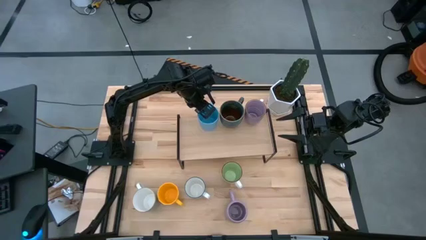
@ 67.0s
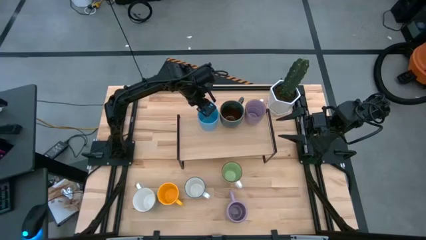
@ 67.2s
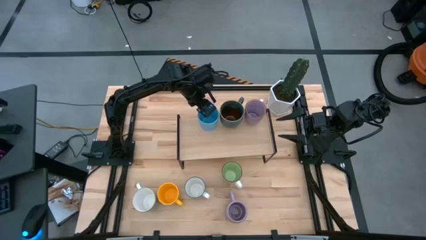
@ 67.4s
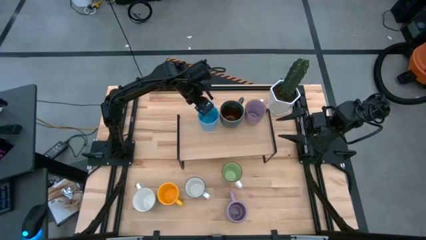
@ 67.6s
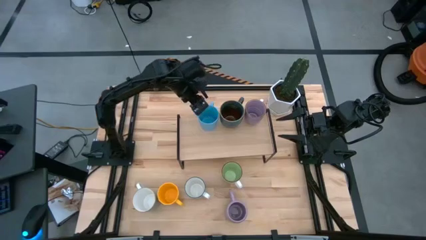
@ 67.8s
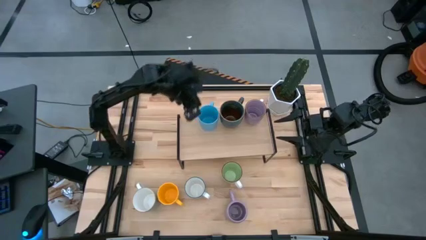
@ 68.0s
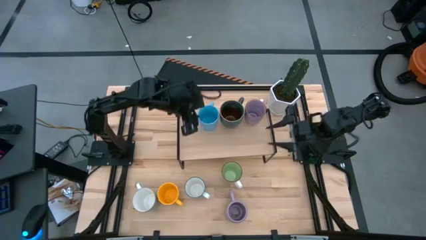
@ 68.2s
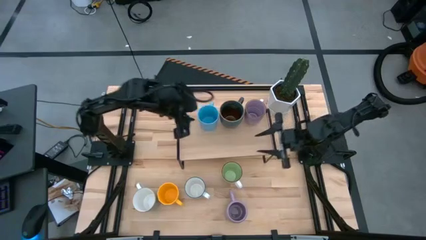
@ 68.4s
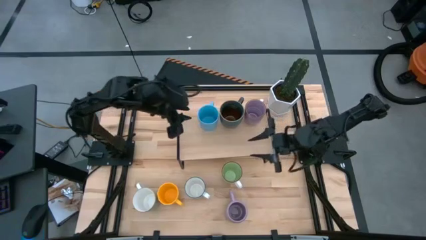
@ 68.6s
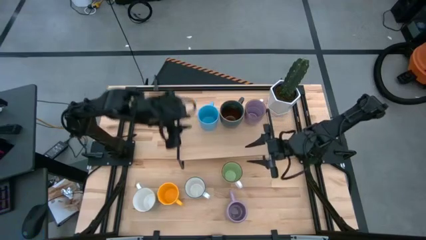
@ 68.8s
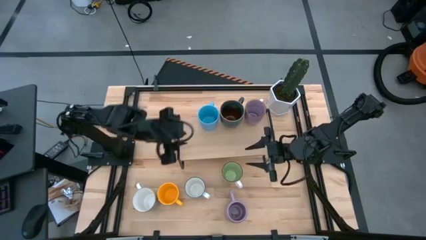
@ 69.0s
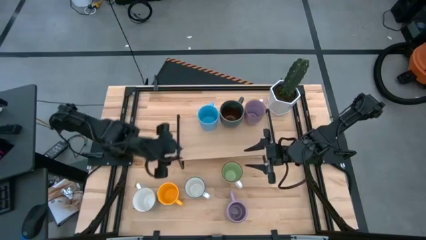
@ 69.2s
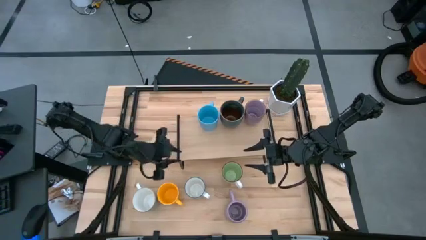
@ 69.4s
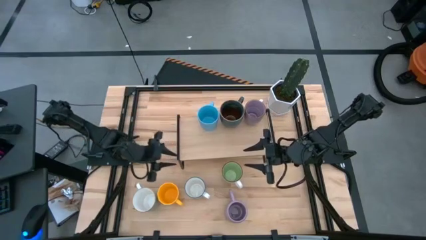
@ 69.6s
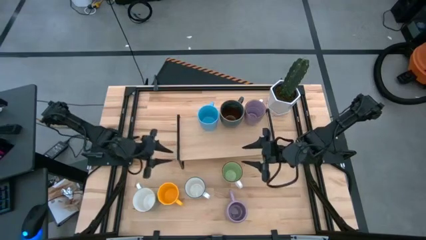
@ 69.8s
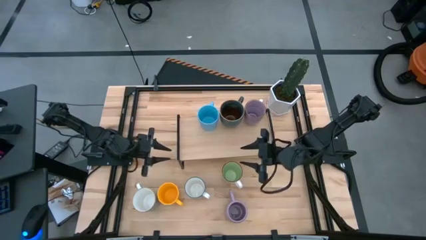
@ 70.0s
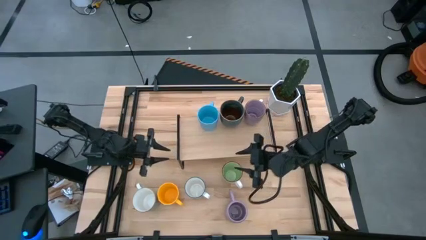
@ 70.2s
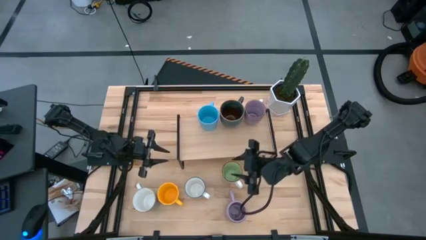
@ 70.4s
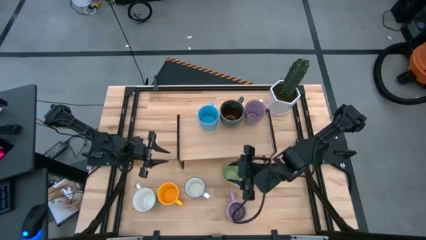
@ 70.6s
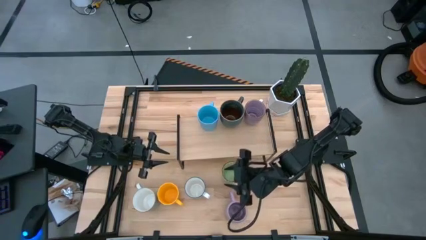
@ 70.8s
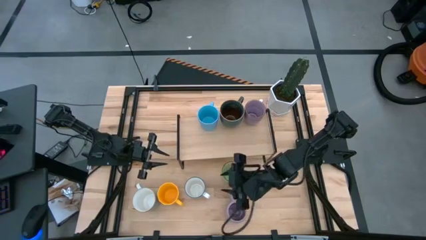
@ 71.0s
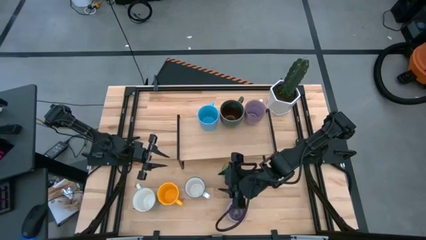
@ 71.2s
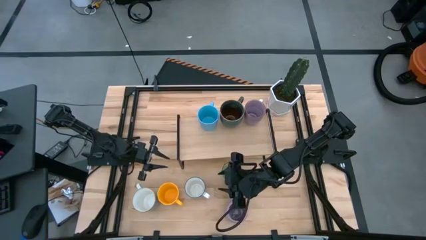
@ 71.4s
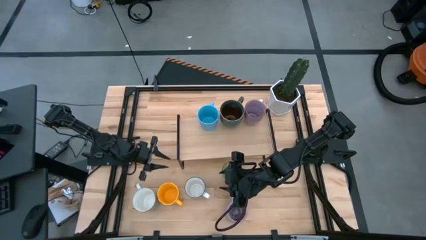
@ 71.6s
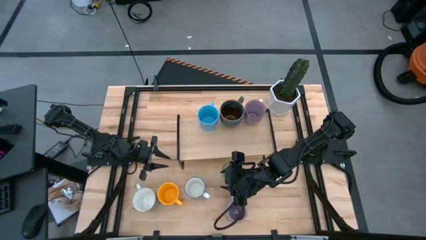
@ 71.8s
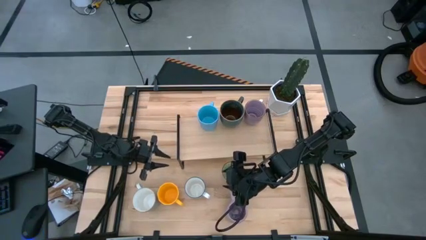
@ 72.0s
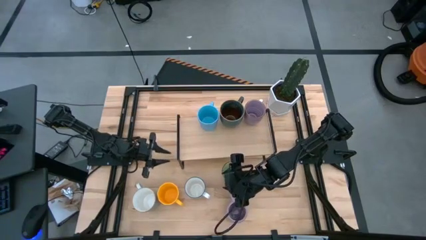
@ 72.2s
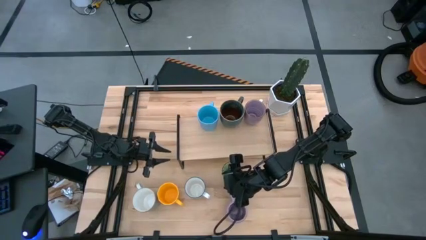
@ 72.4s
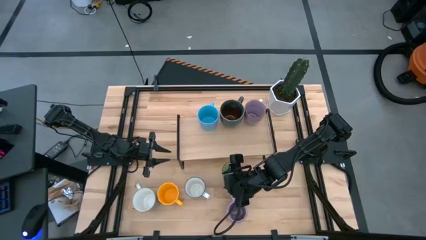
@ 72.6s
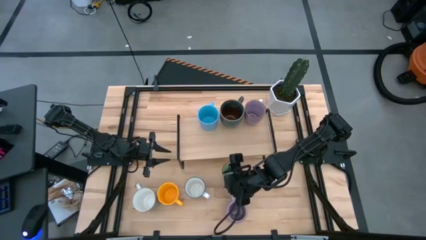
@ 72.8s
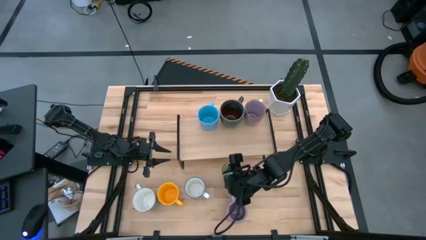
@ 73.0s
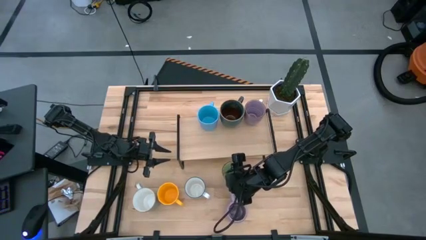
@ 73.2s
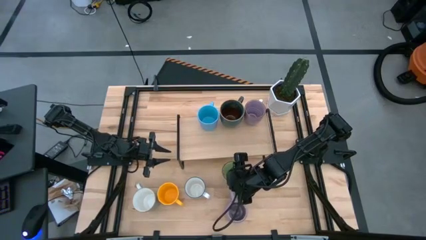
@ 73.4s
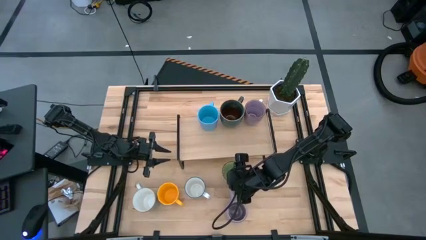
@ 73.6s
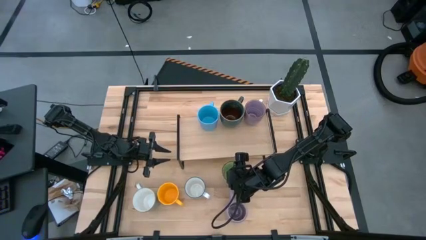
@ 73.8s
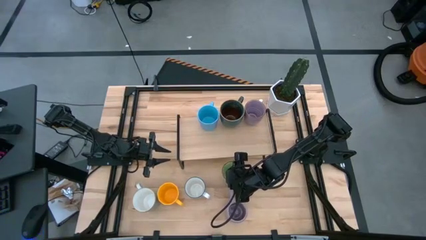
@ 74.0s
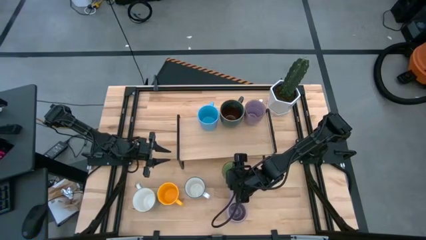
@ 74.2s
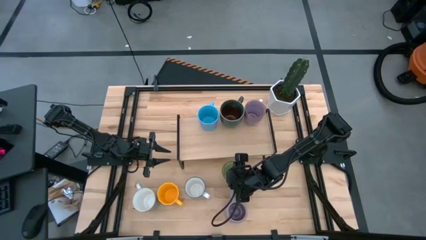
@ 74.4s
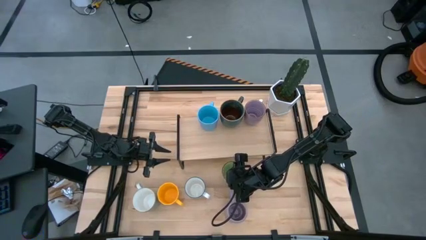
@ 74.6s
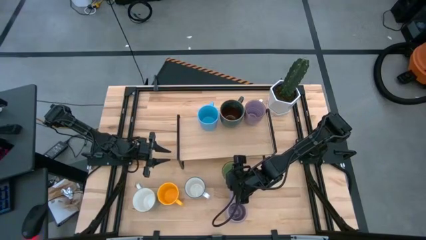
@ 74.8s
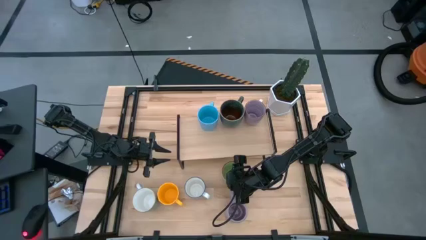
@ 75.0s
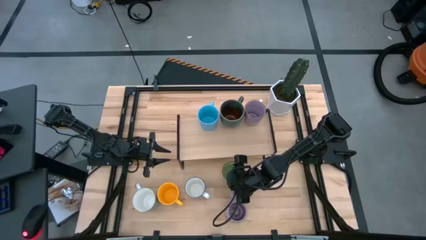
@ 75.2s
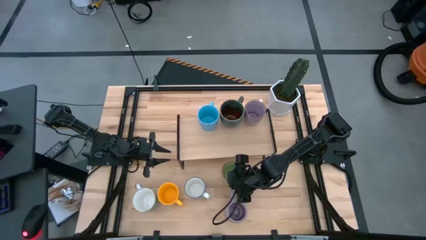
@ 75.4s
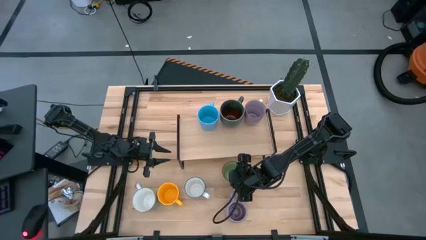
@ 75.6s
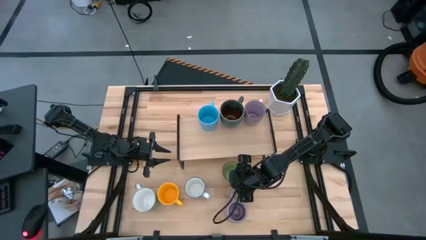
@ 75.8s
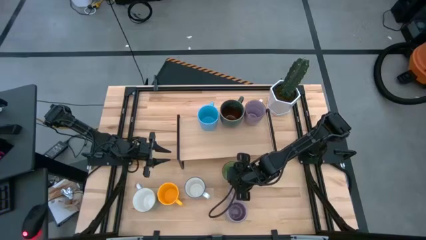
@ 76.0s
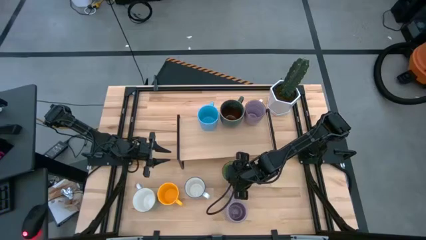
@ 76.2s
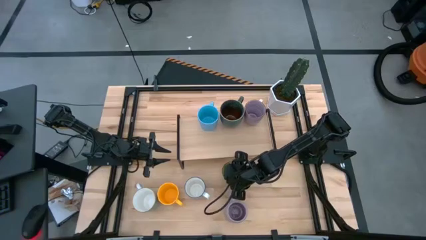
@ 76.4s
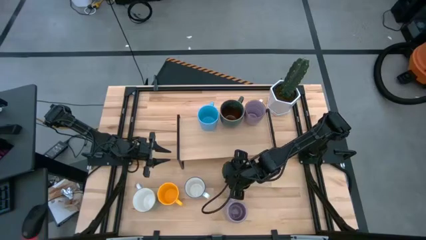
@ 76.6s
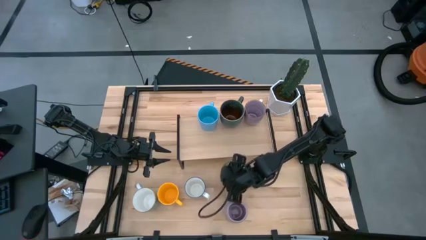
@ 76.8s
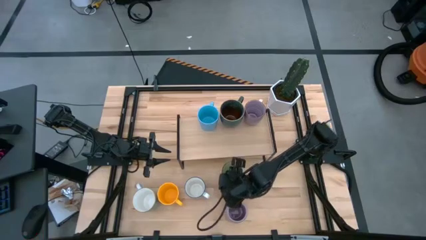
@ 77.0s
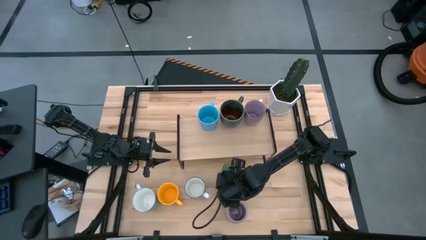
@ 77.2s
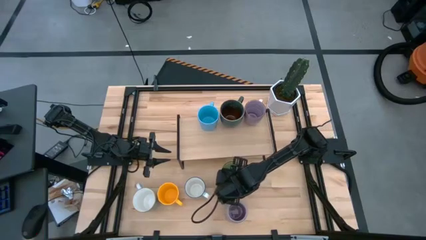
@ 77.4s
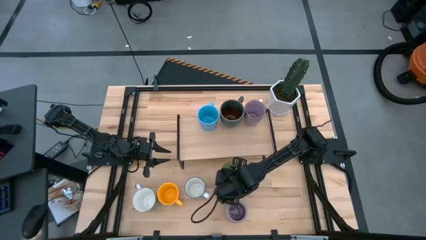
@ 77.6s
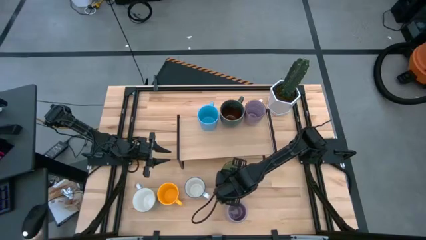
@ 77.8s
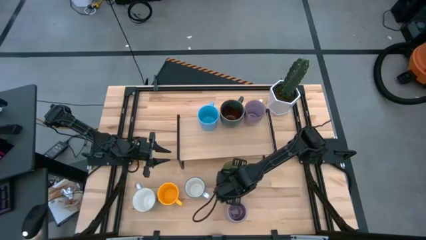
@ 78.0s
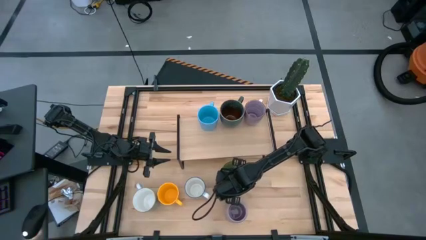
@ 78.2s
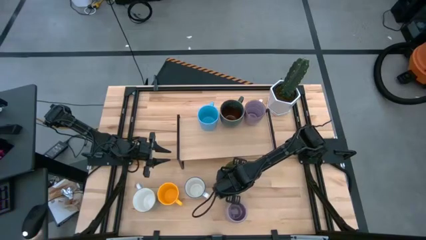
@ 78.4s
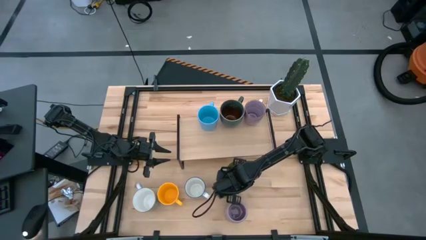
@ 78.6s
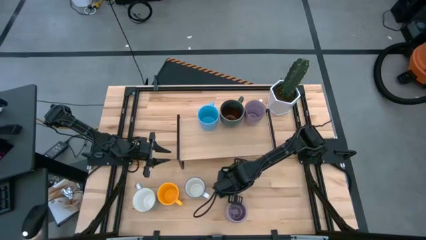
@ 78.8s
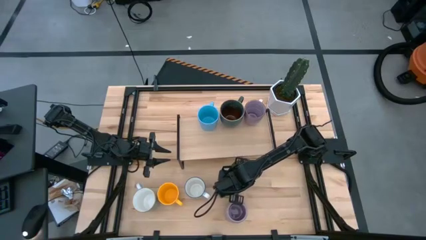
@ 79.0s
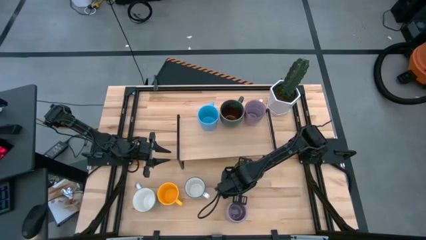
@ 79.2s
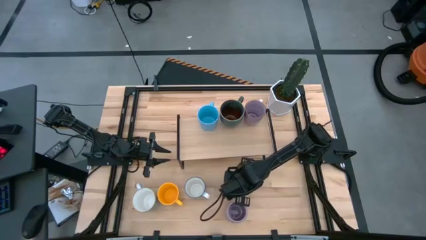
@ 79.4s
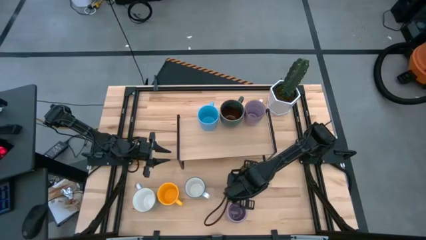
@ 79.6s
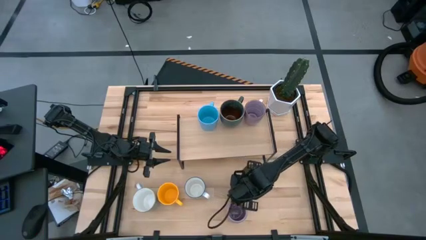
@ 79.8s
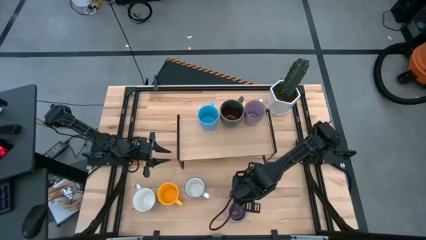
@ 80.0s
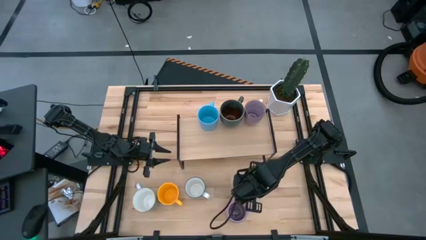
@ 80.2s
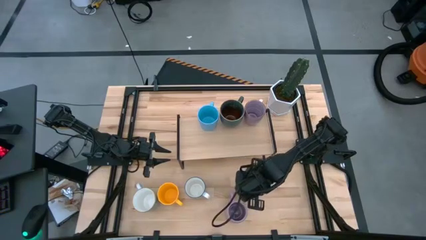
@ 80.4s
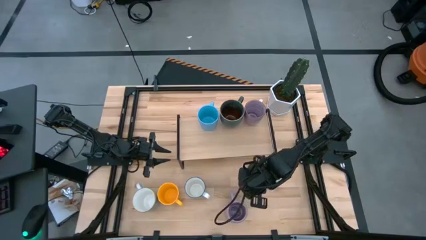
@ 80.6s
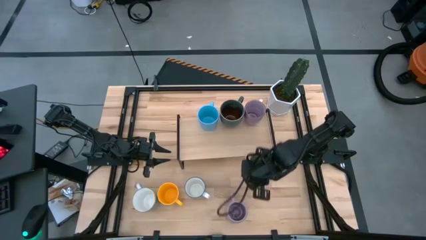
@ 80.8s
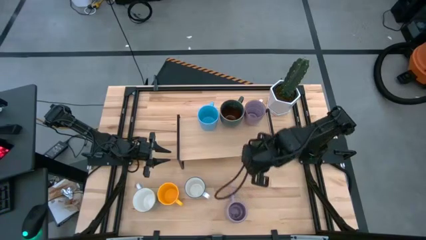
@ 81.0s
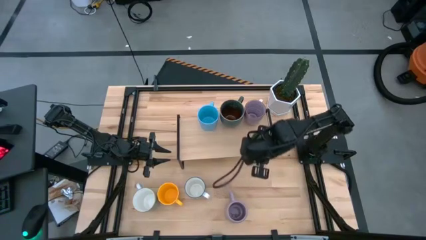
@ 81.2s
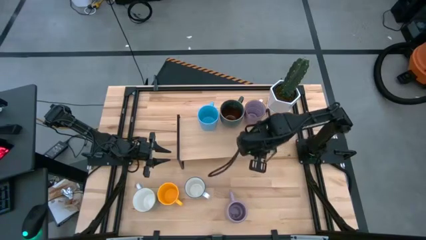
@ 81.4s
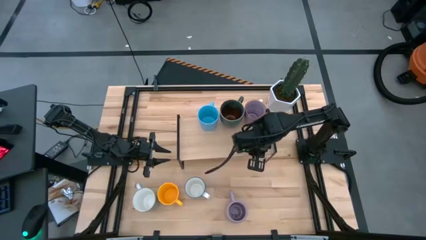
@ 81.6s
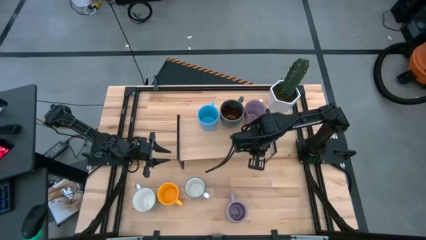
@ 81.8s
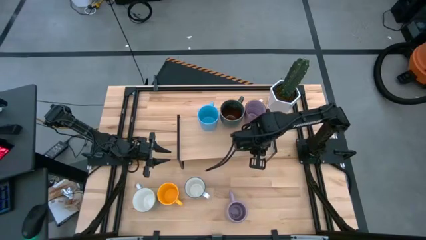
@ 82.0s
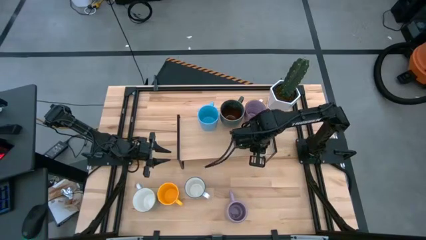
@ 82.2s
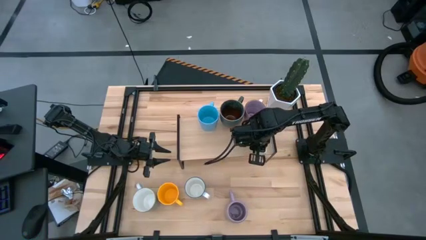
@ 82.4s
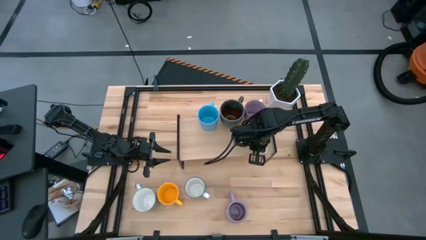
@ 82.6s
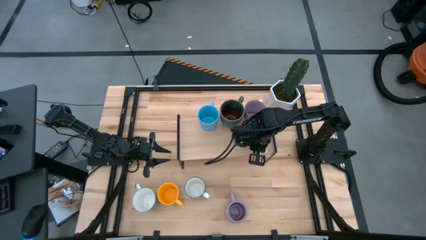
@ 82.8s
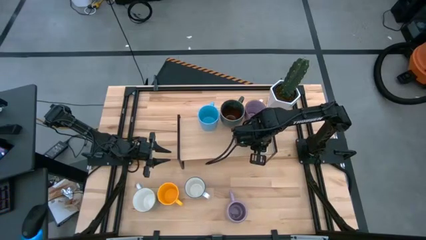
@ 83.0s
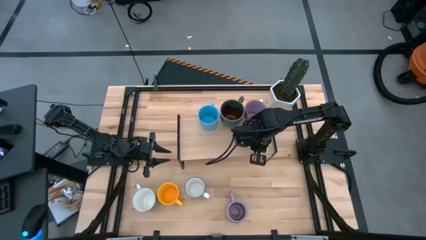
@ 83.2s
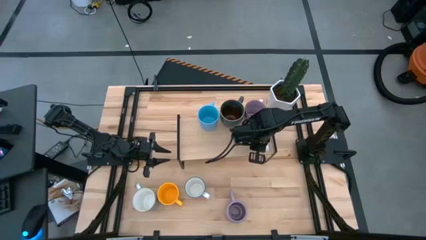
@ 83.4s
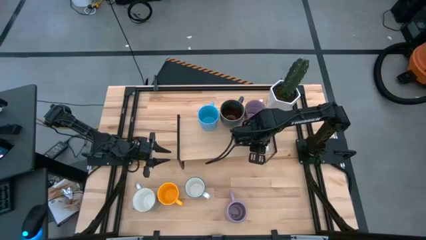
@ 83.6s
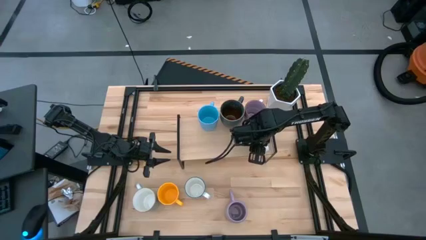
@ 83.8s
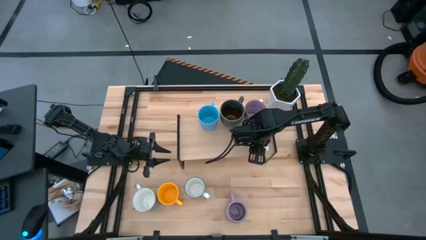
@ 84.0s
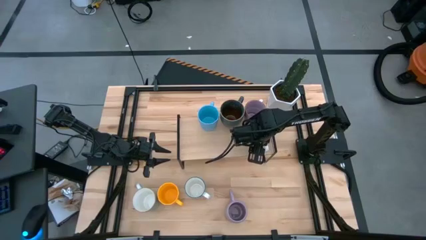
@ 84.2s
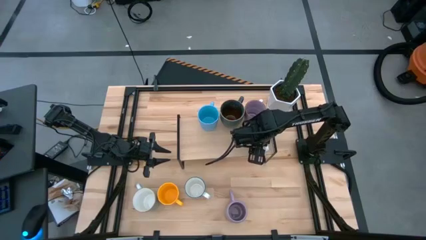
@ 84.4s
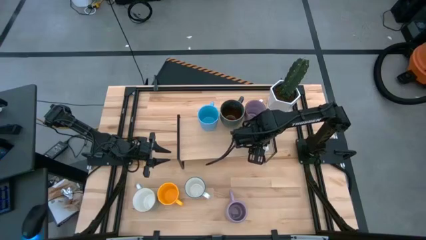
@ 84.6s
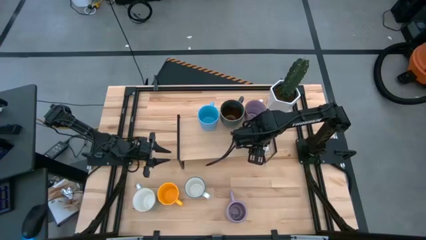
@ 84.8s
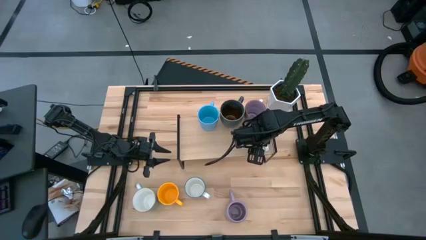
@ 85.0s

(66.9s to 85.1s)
Task: Place coffee mugs
Put the green mug on the shelf
